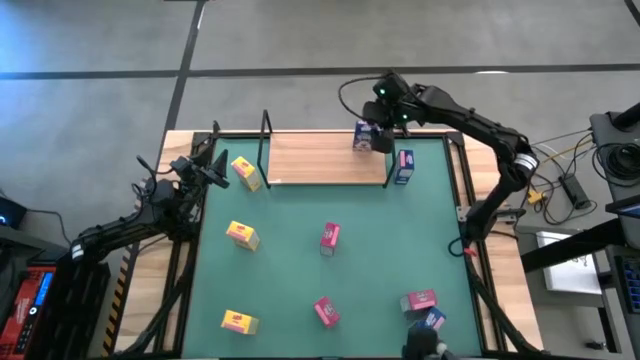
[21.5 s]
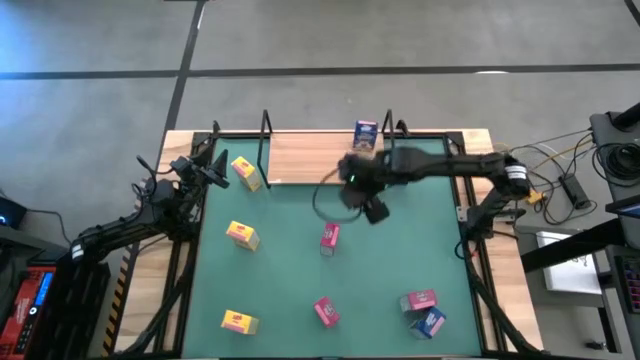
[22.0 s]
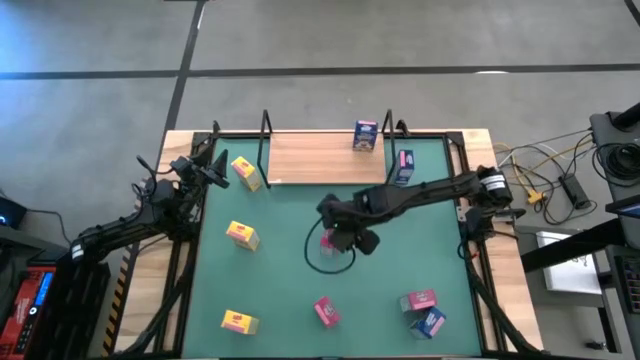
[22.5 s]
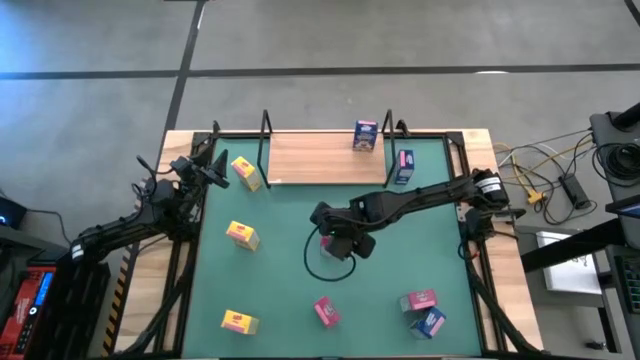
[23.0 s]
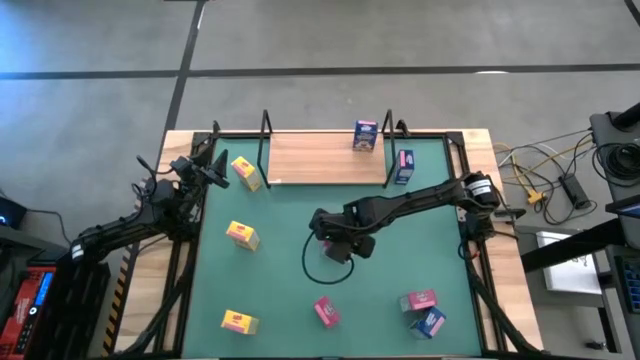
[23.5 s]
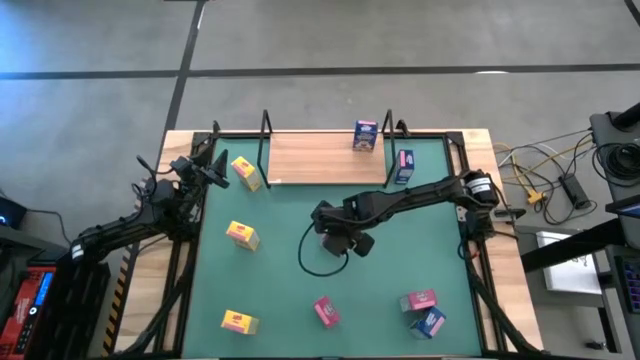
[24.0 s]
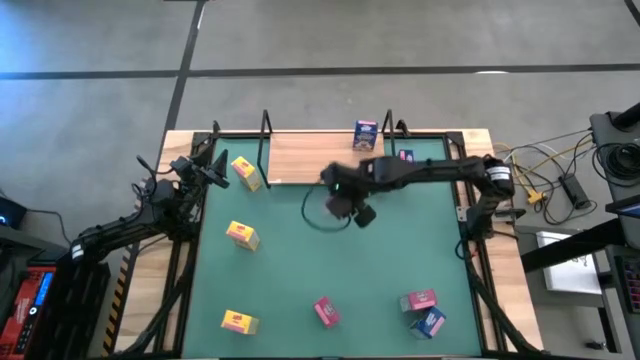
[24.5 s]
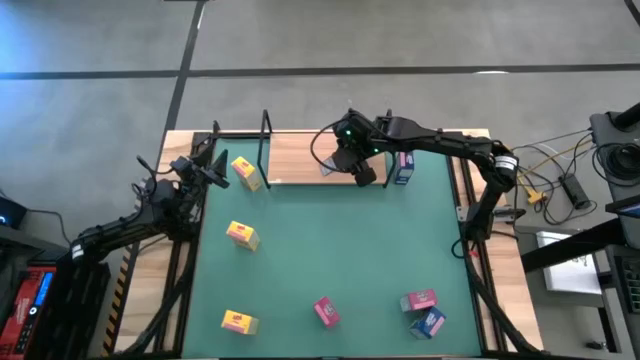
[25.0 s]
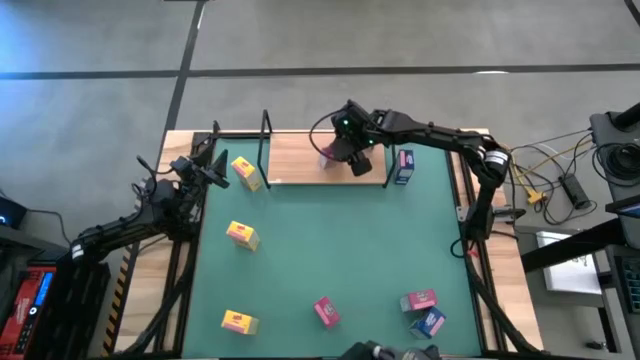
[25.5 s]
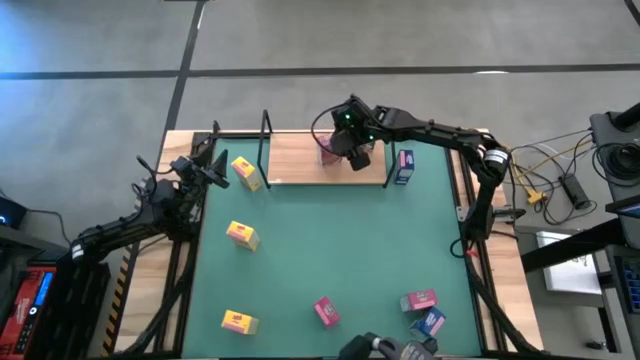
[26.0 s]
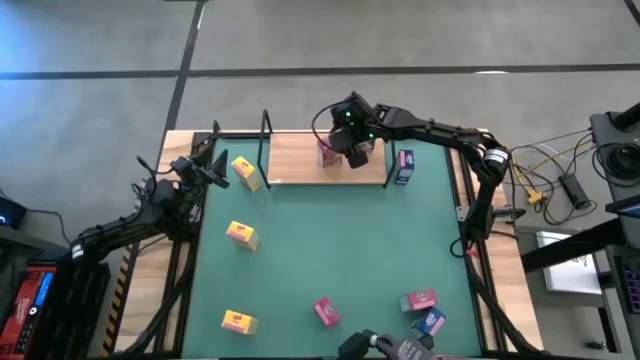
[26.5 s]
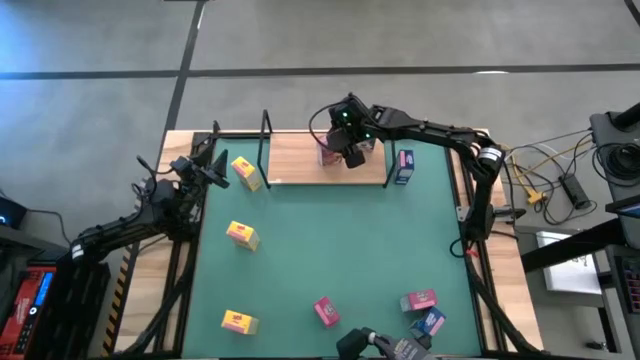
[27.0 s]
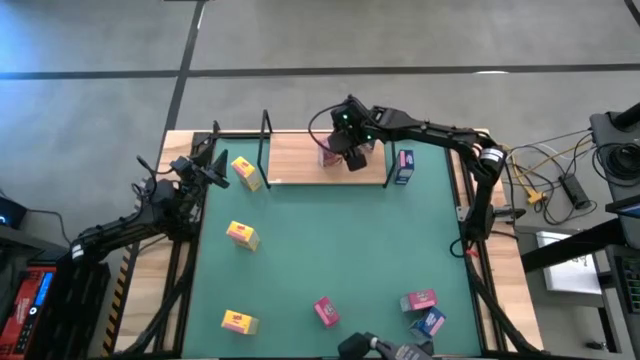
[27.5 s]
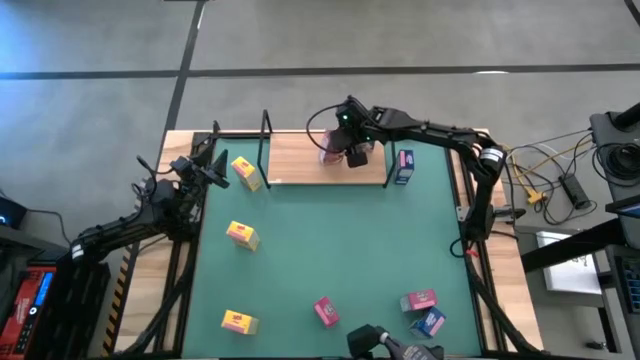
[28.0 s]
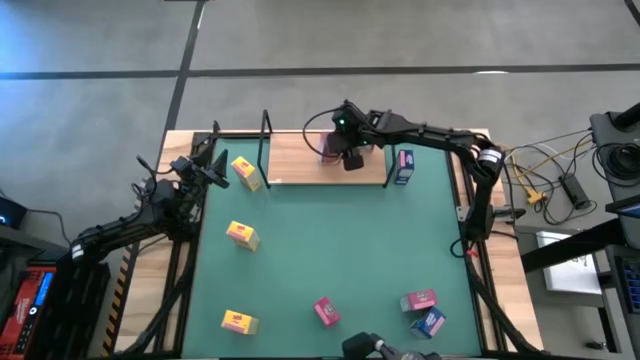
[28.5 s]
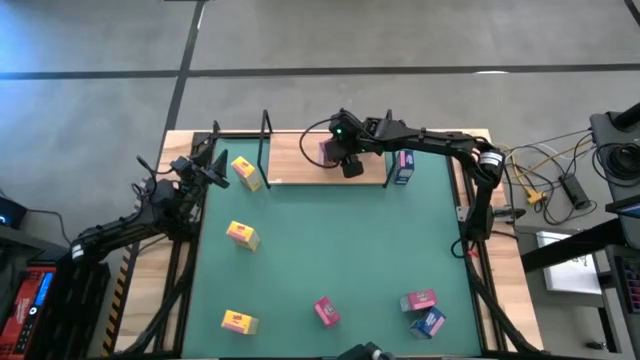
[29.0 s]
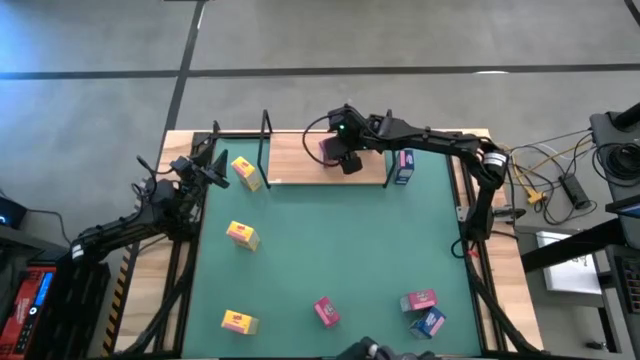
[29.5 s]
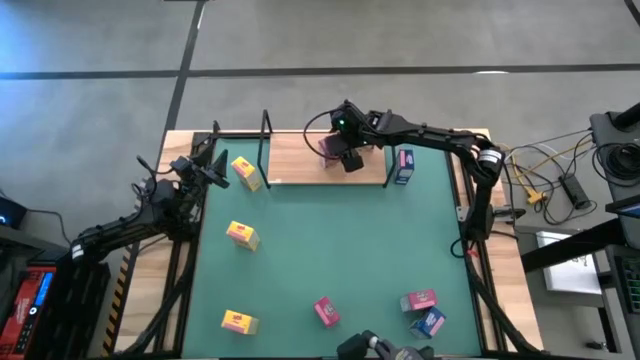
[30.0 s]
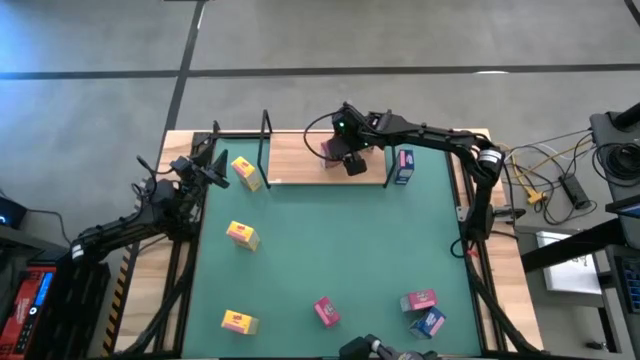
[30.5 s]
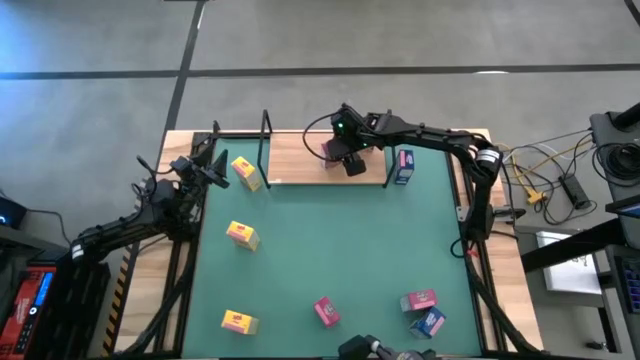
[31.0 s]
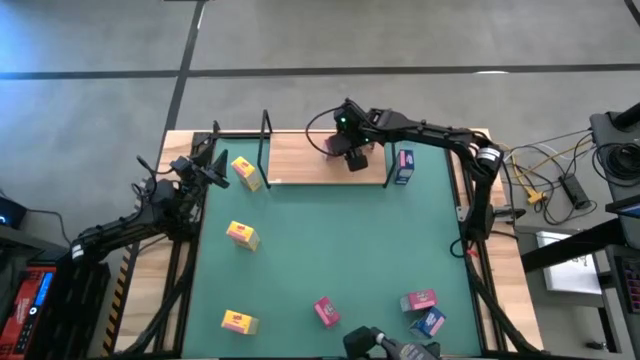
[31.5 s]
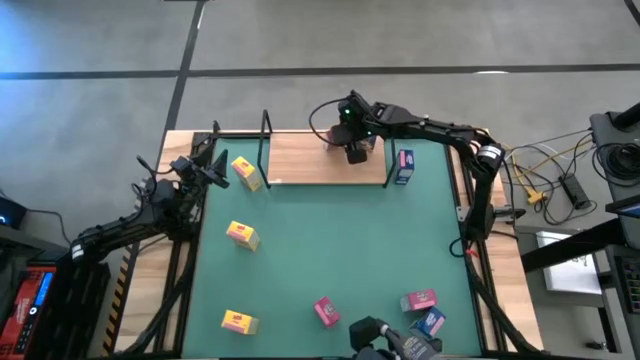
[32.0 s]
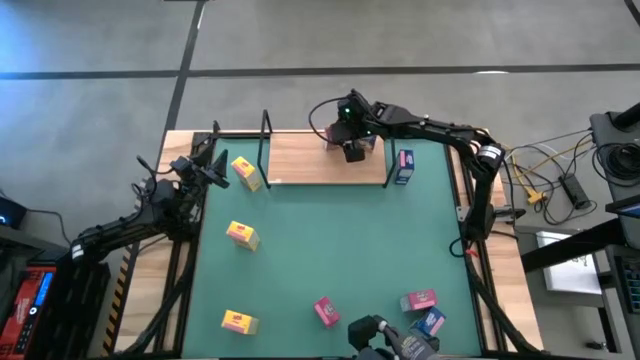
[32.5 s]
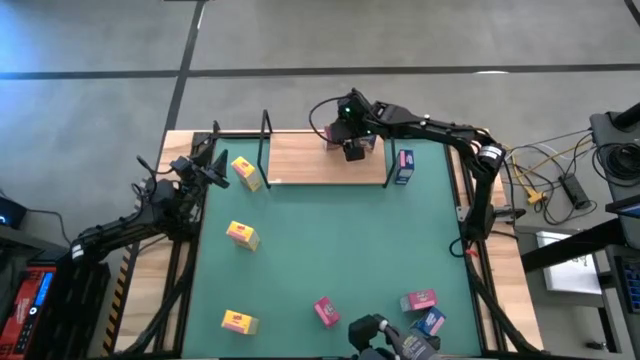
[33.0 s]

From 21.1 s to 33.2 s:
Task: Stack cereal on shelf
Put the top red cereal box on the shelf

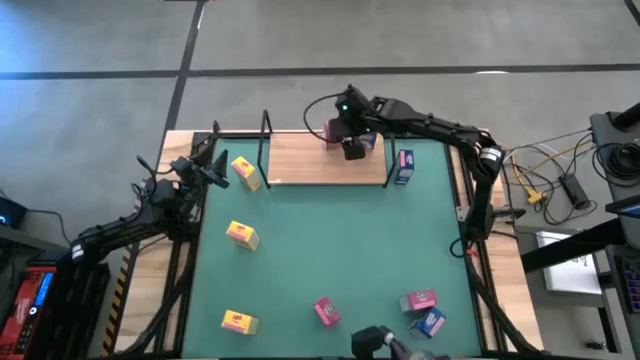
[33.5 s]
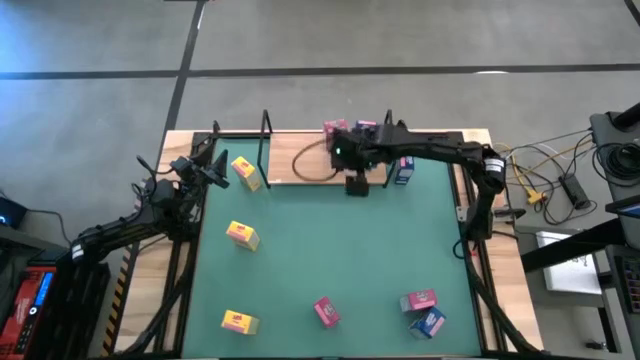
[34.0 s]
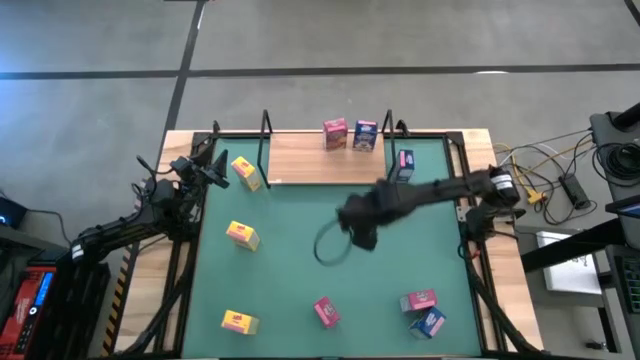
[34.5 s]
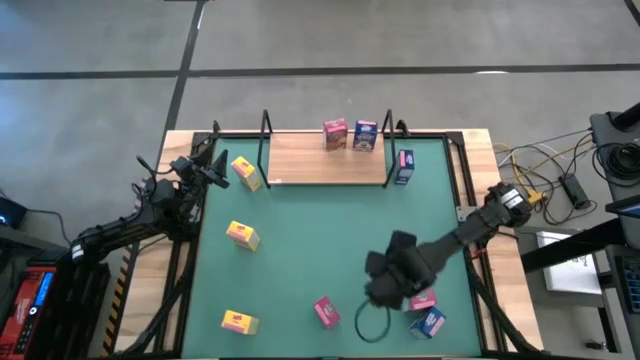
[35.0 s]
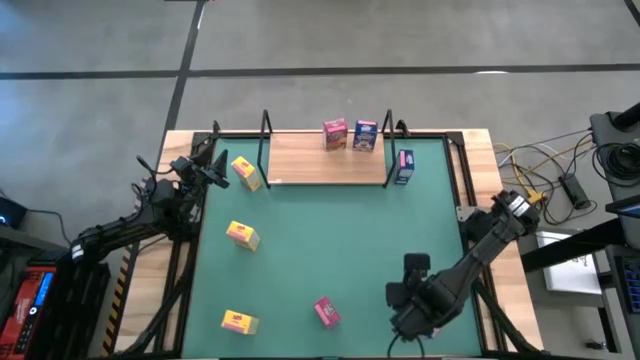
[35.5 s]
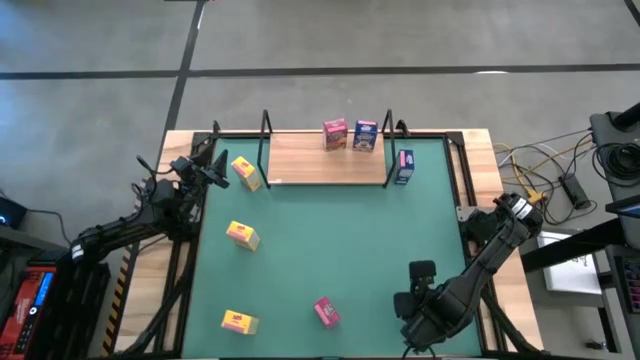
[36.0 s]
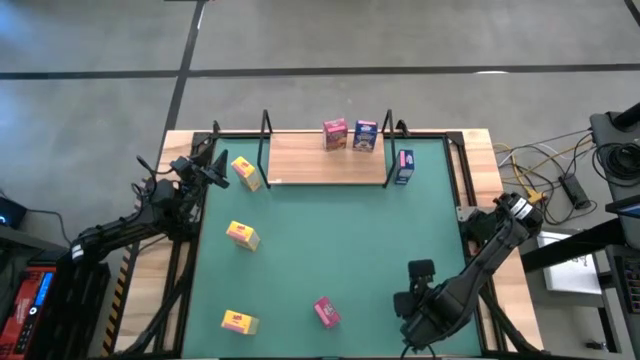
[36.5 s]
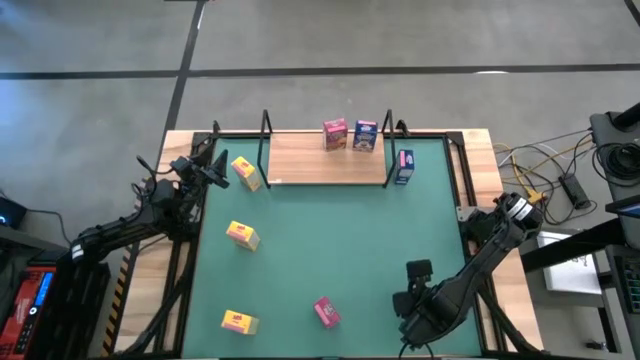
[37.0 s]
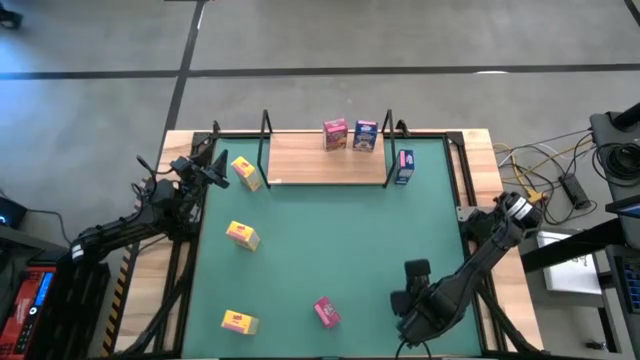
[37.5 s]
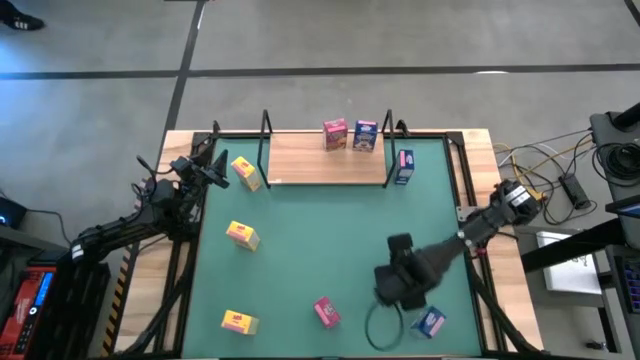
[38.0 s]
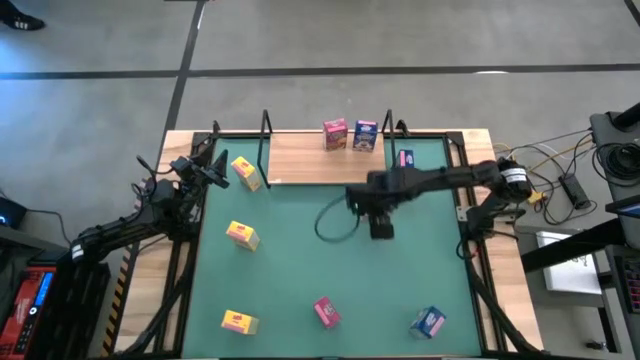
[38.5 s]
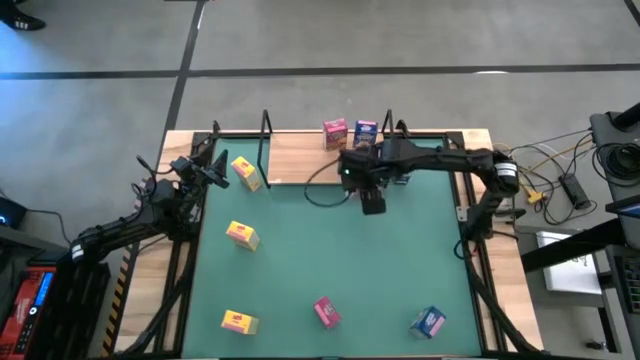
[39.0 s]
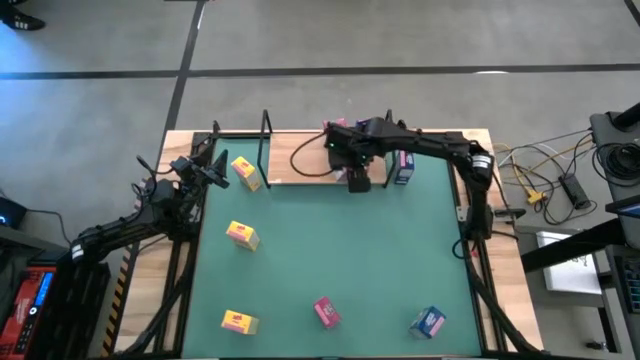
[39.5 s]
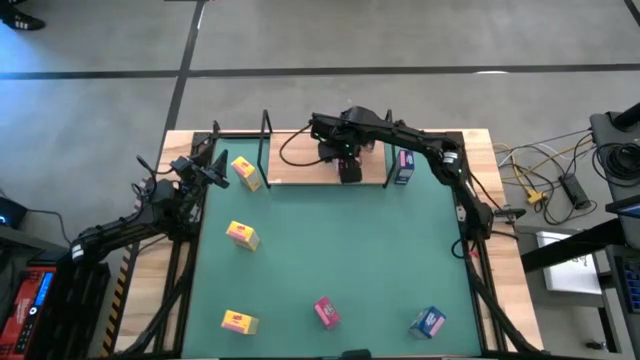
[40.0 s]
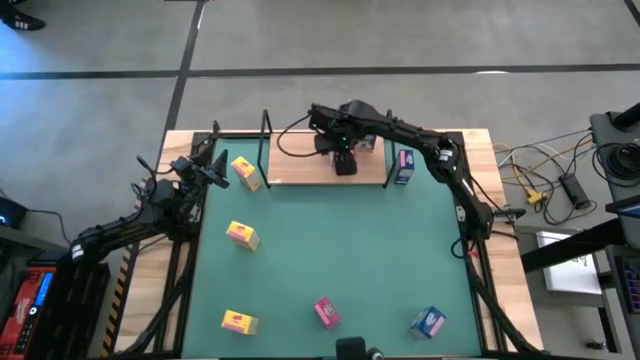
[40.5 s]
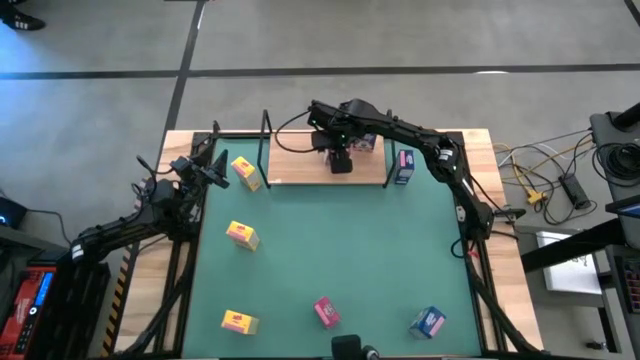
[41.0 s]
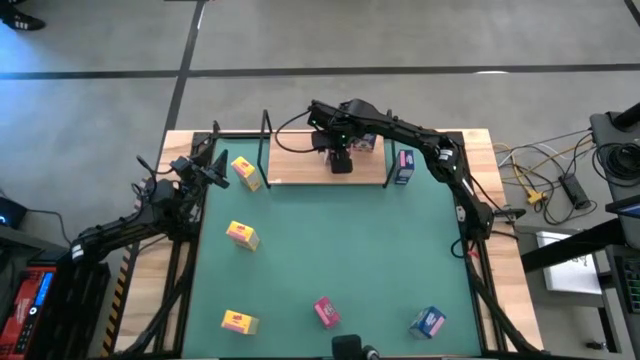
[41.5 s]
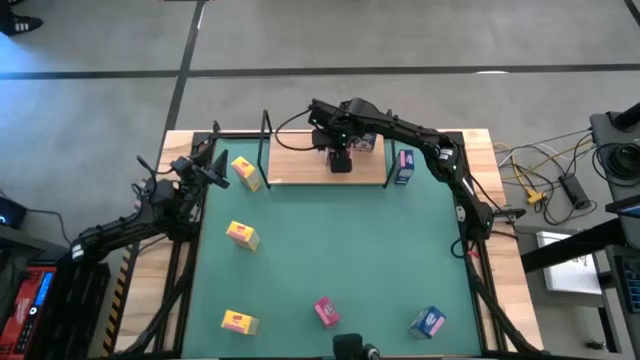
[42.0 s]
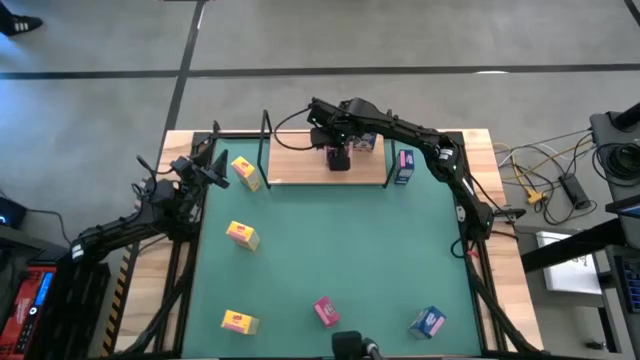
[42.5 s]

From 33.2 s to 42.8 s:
Put the right red cereal box on the shelf and align with the other red cereal box
